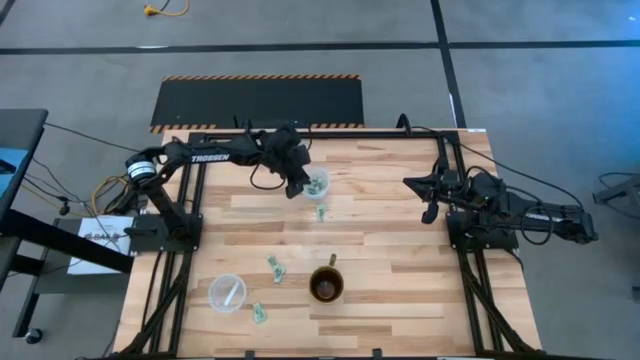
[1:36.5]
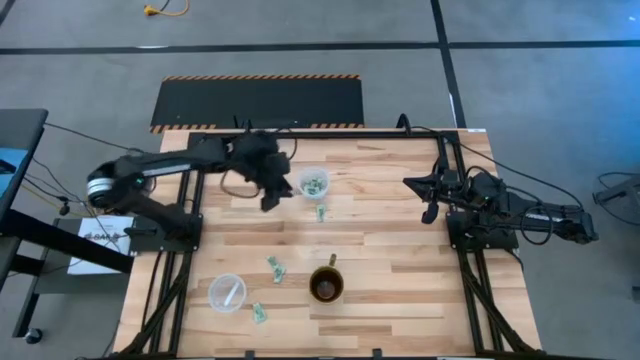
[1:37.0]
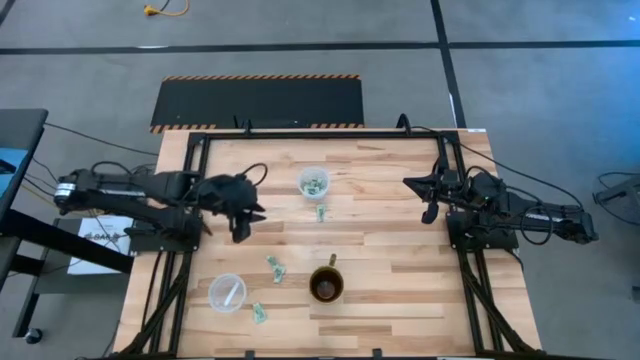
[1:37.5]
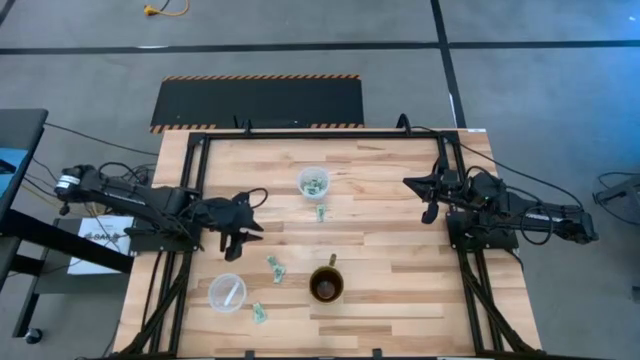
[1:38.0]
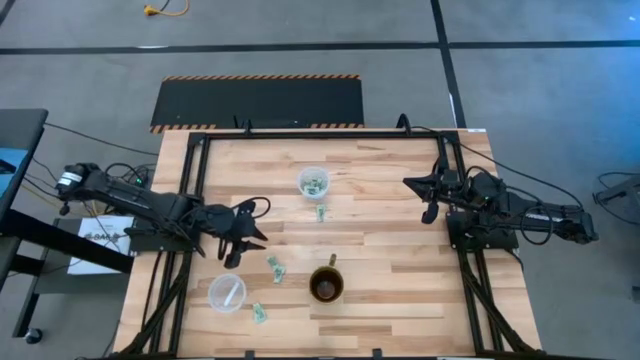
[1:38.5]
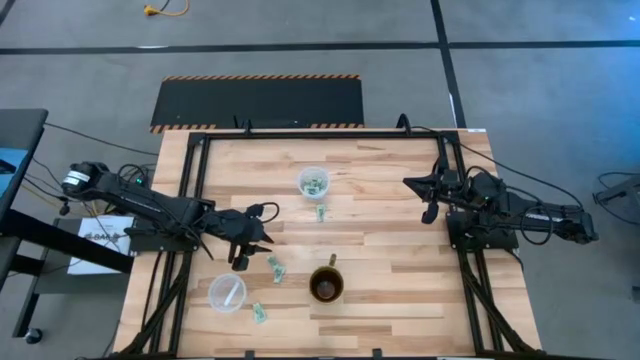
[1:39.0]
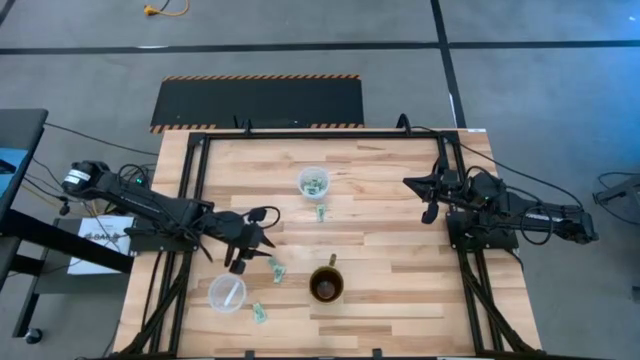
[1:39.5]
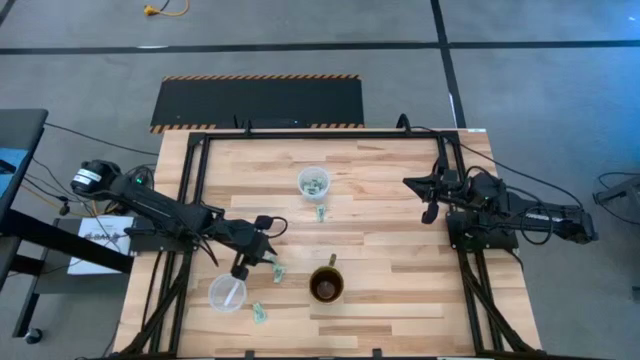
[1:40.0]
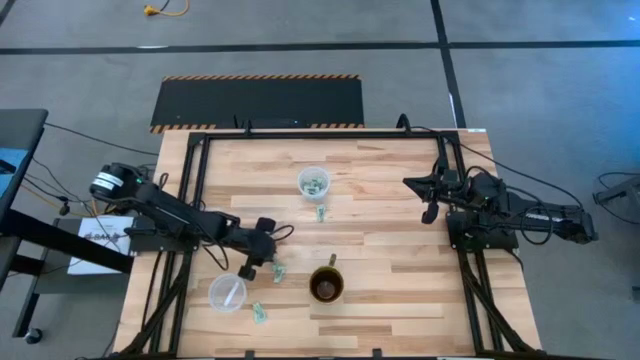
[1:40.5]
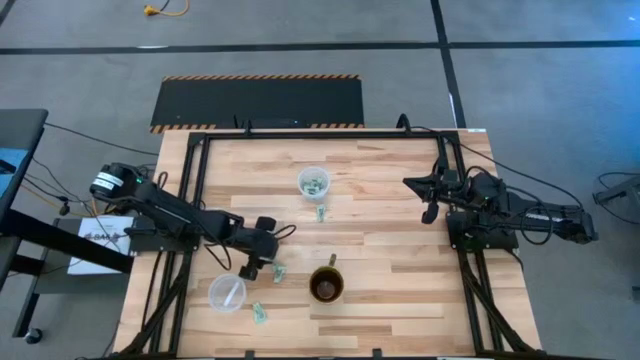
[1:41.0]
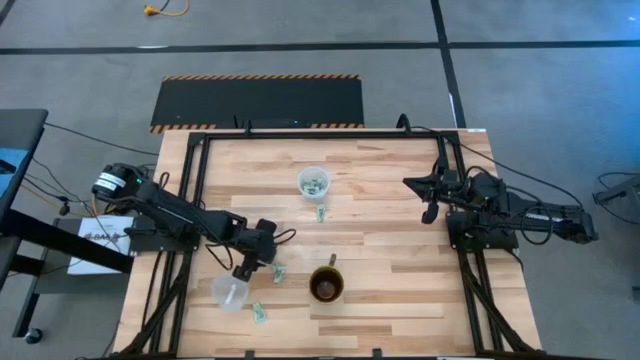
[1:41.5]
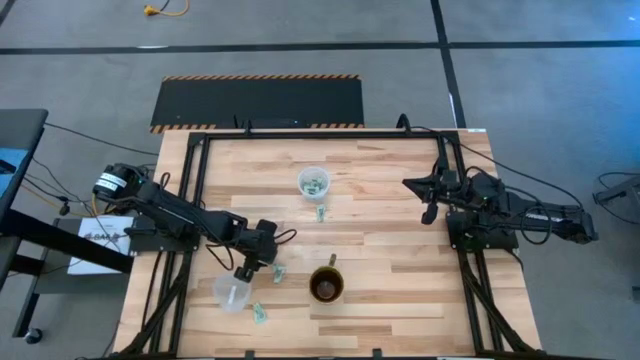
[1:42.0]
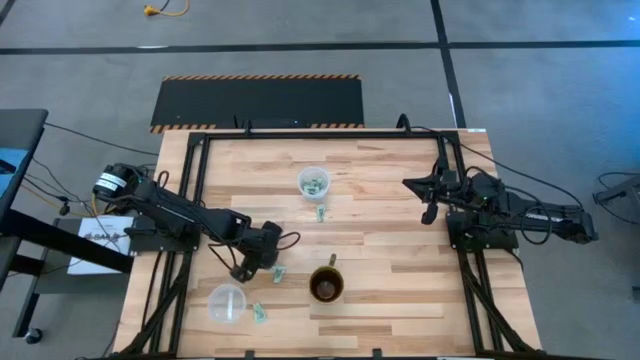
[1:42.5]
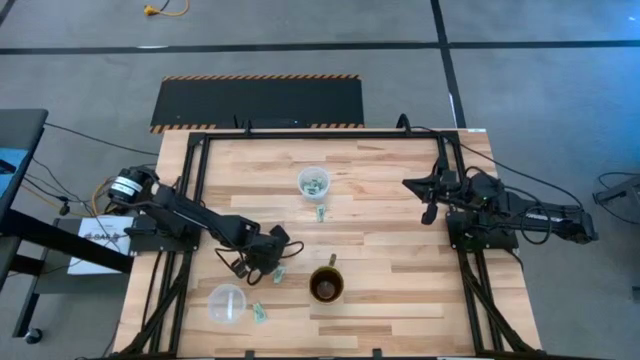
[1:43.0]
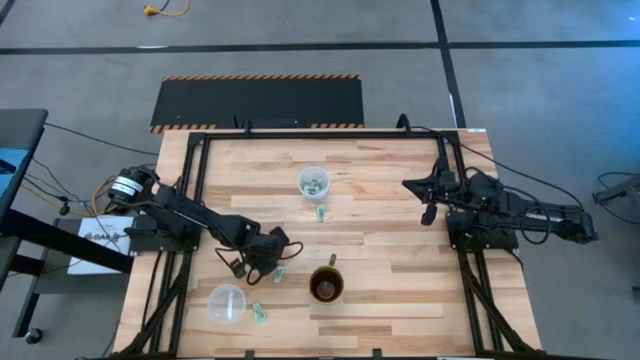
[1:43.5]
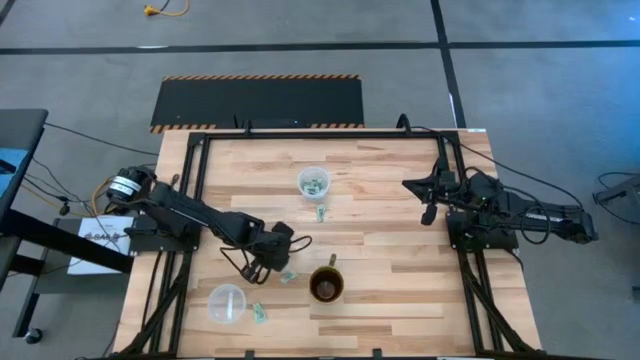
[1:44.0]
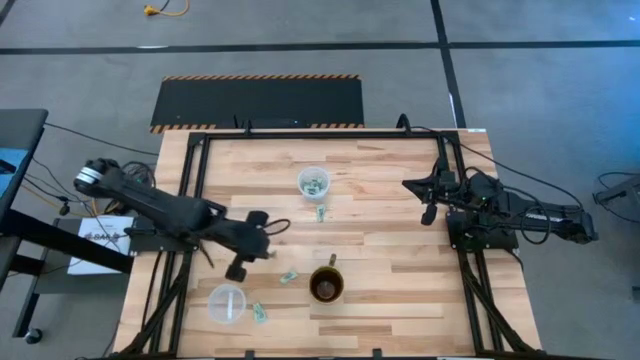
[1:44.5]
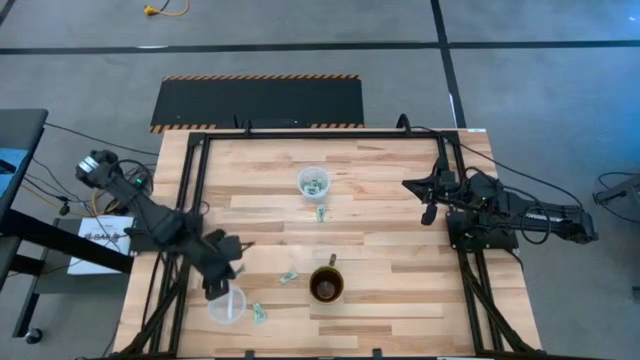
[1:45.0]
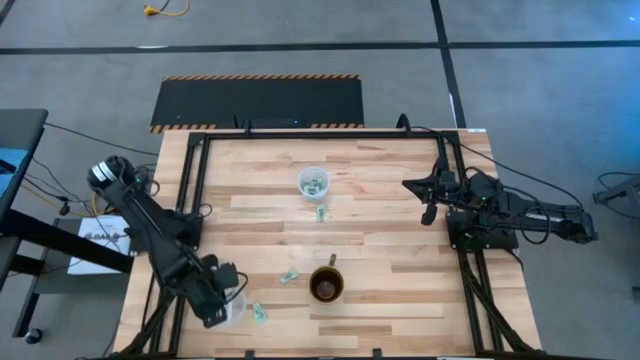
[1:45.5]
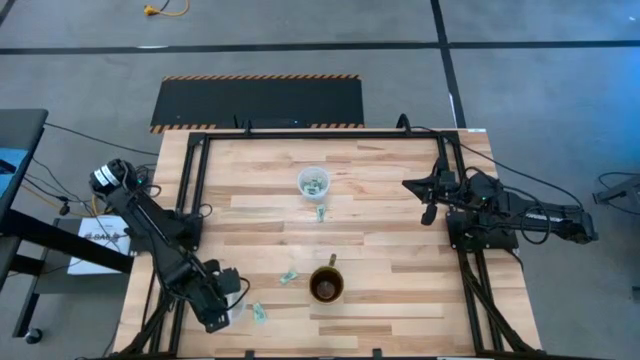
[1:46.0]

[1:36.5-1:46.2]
Task: Pick and place items into bin
Put the stevia packet into the bottom transparent bin

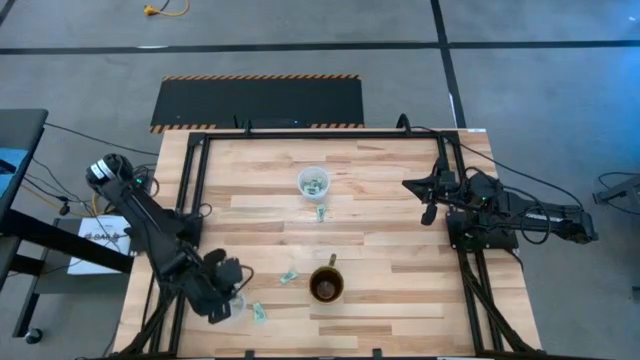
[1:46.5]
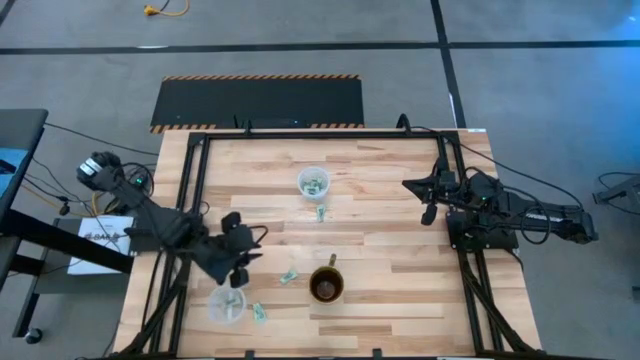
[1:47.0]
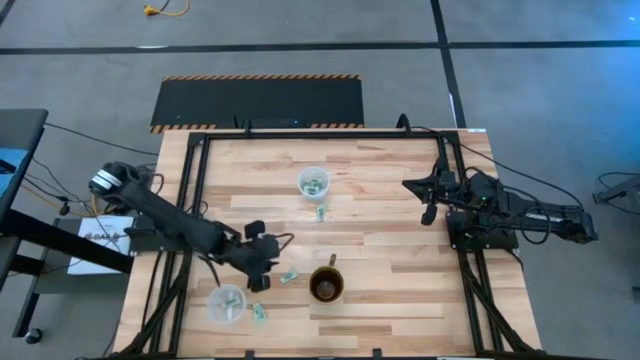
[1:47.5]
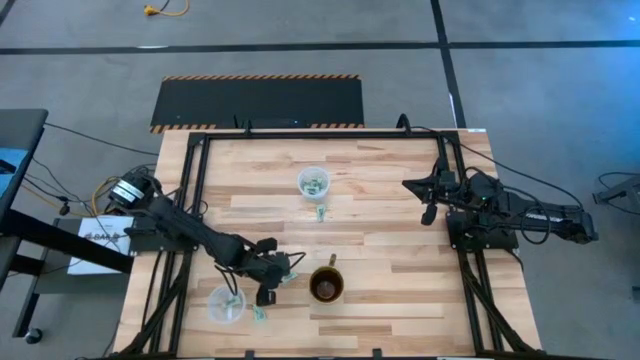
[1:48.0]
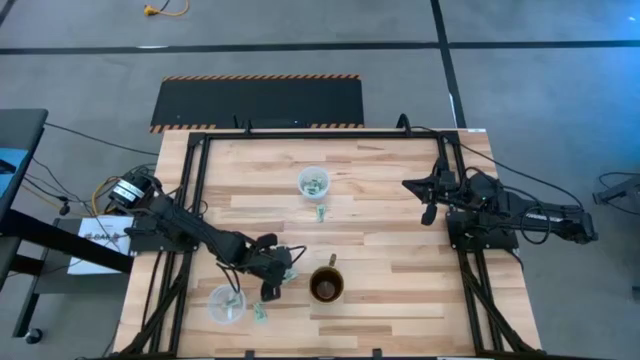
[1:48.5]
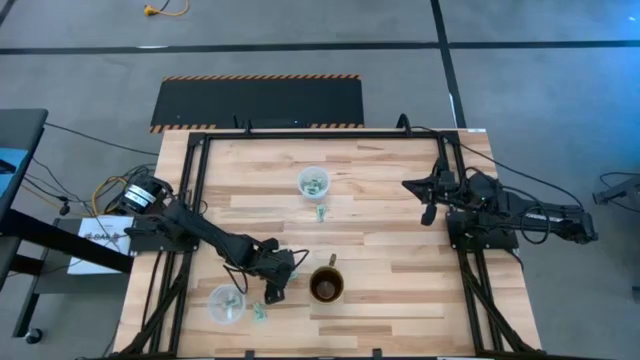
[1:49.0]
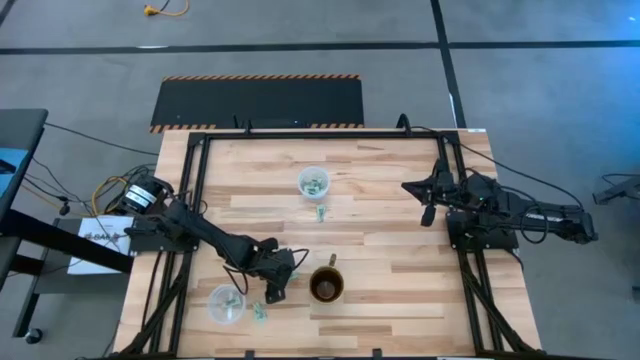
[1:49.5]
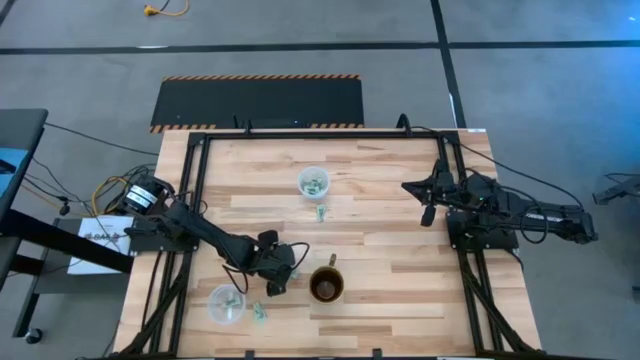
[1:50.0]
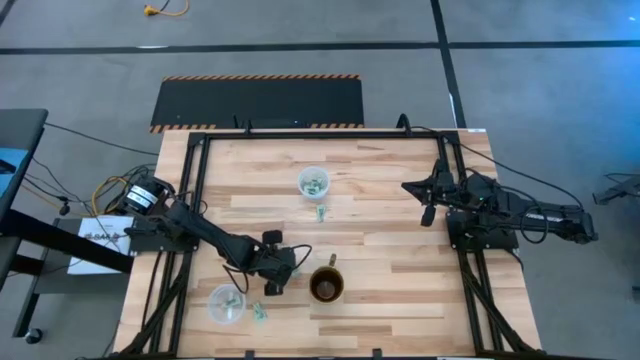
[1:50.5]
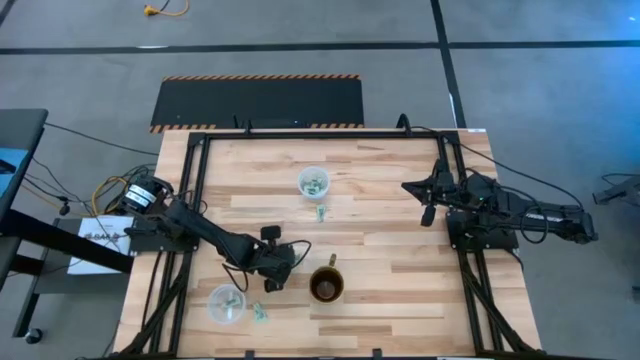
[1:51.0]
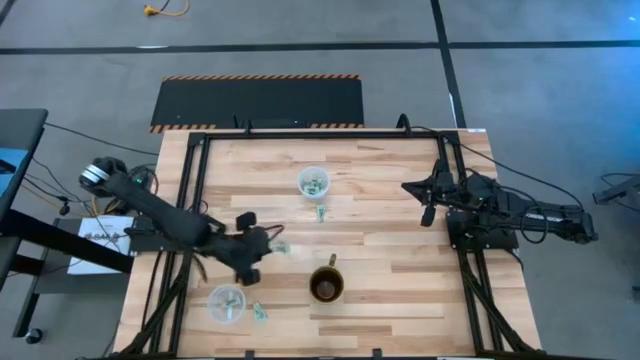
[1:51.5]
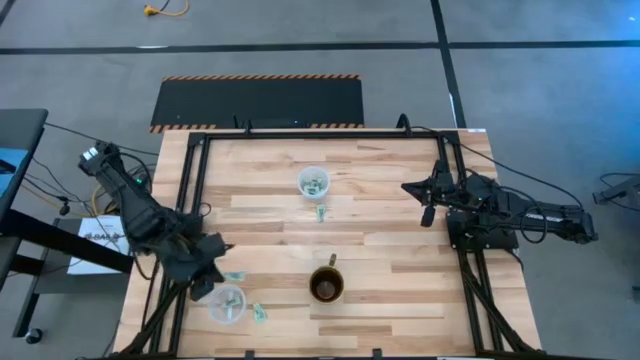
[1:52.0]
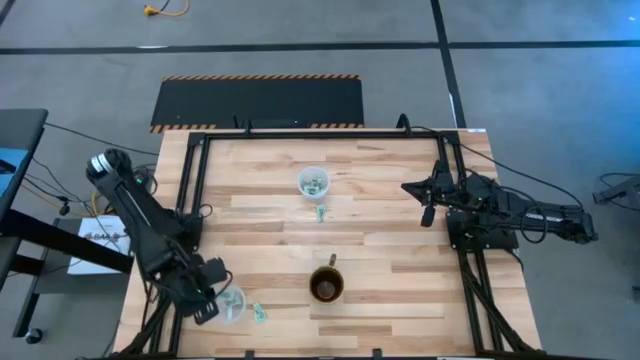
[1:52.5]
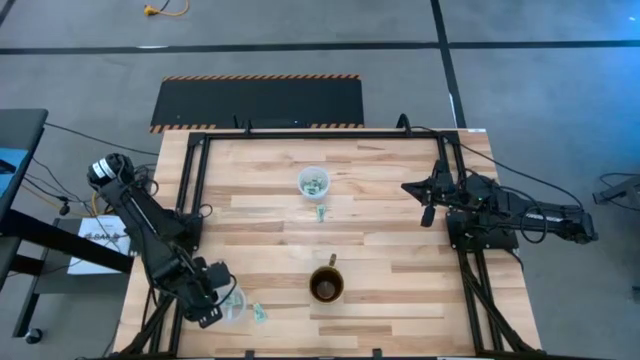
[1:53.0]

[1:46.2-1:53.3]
Put the stevia packet into the bottom transparent bin

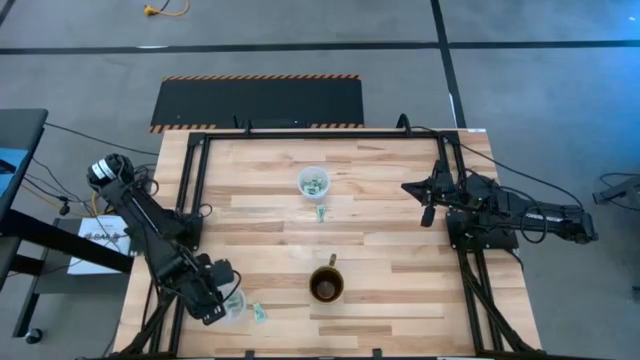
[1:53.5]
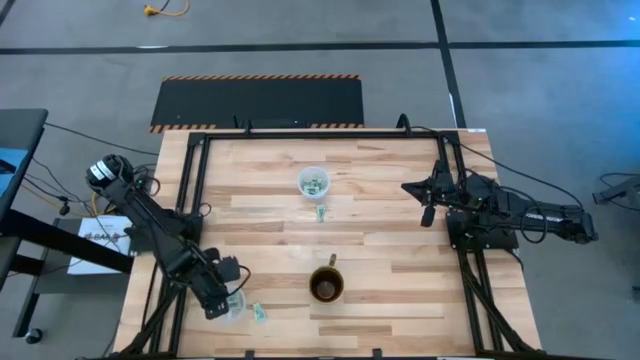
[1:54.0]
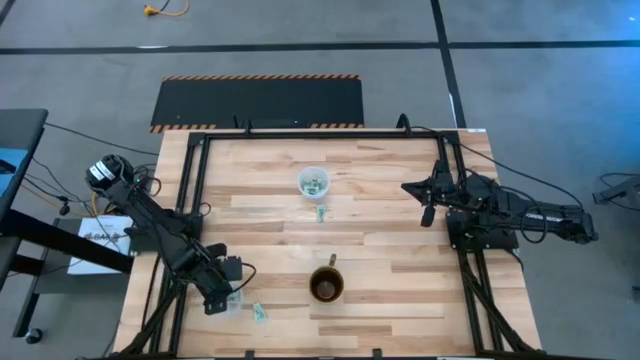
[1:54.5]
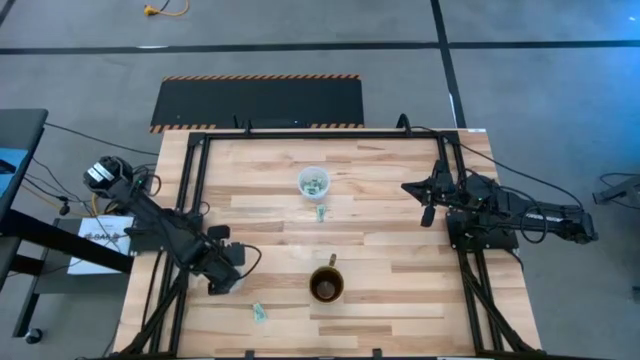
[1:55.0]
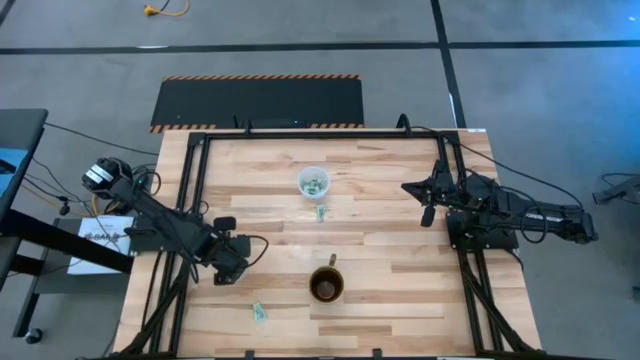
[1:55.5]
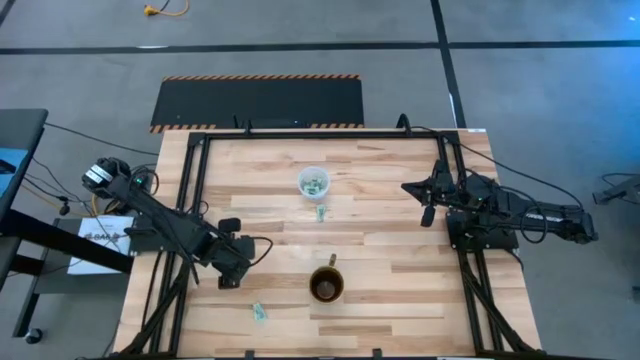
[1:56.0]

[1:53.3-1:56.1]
Adjust the bottom transparent bin
